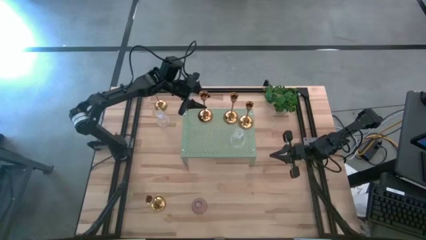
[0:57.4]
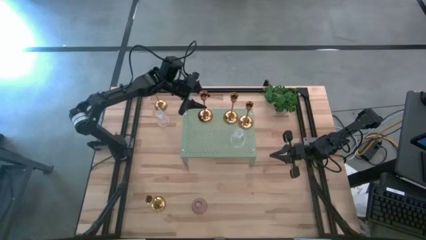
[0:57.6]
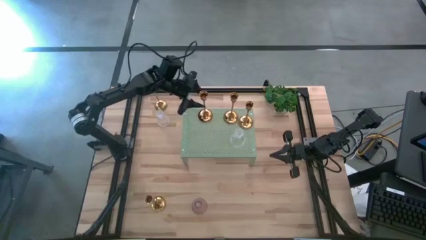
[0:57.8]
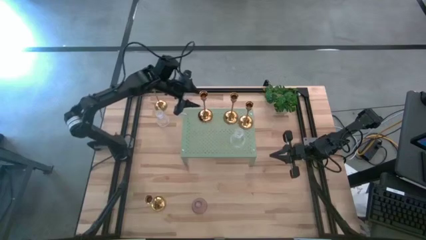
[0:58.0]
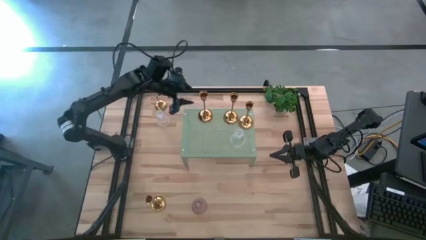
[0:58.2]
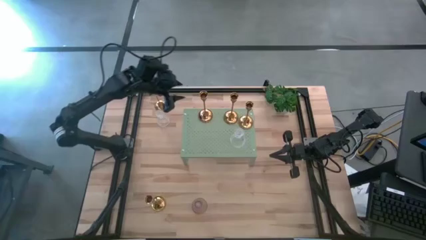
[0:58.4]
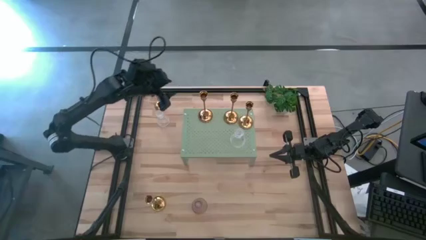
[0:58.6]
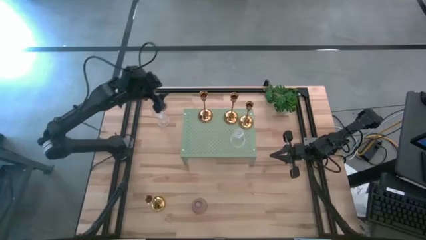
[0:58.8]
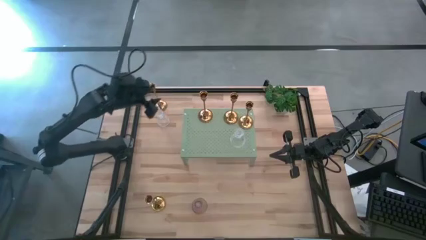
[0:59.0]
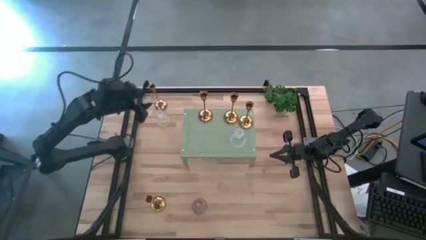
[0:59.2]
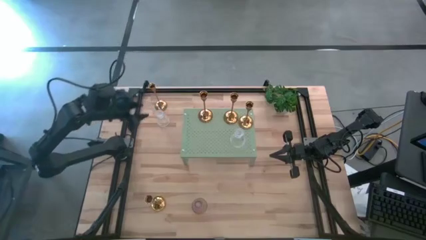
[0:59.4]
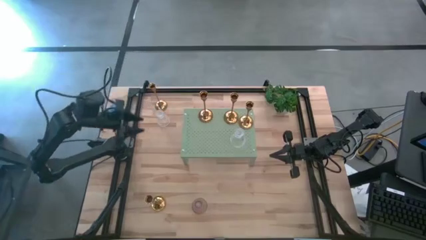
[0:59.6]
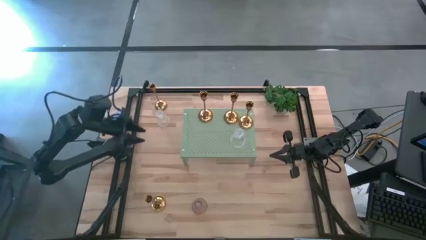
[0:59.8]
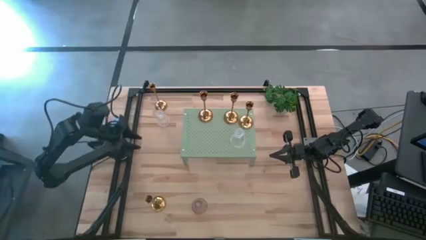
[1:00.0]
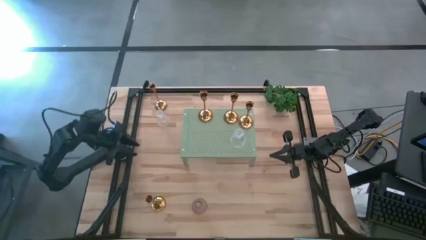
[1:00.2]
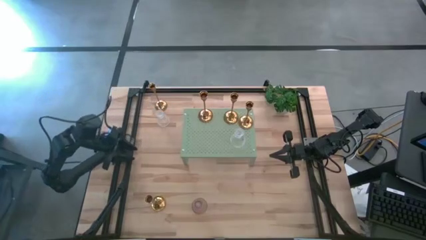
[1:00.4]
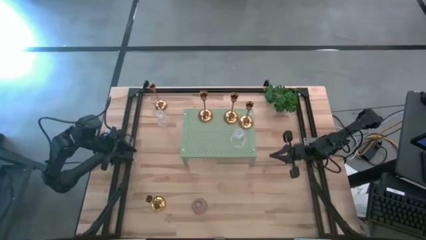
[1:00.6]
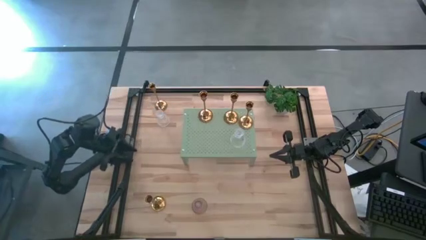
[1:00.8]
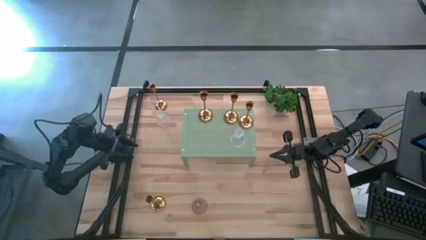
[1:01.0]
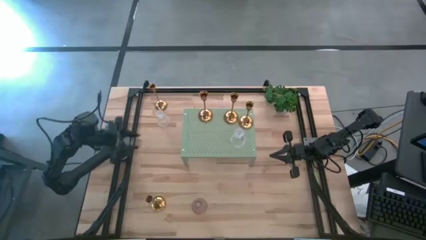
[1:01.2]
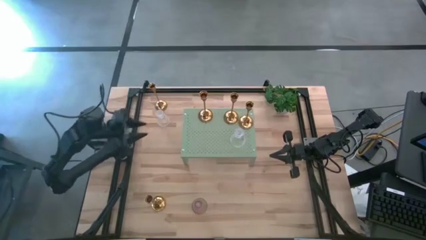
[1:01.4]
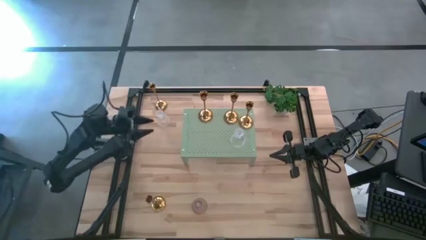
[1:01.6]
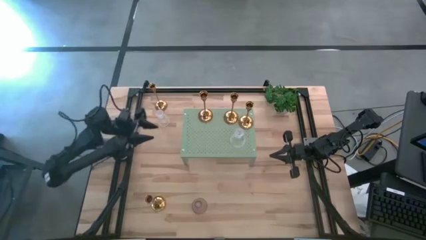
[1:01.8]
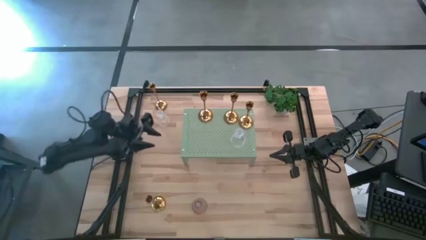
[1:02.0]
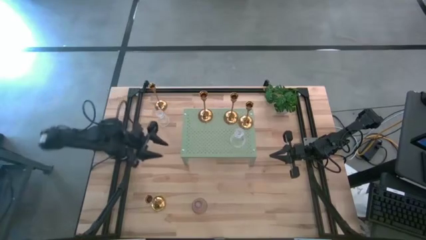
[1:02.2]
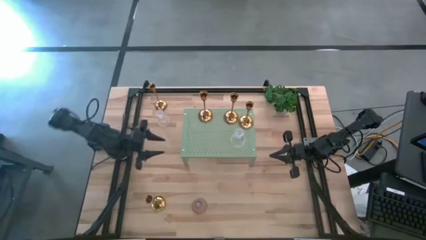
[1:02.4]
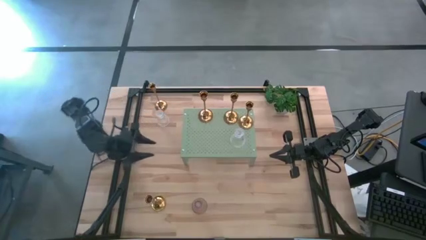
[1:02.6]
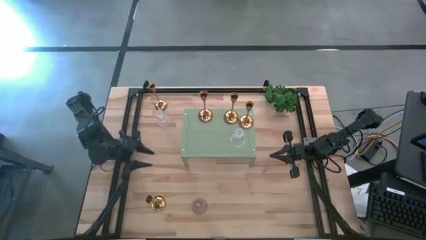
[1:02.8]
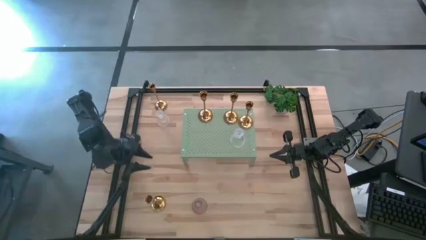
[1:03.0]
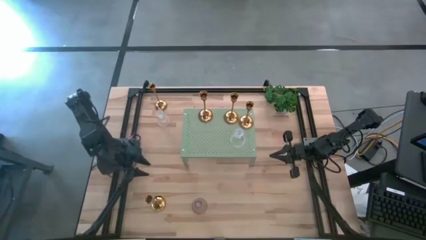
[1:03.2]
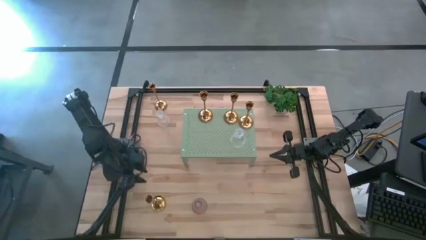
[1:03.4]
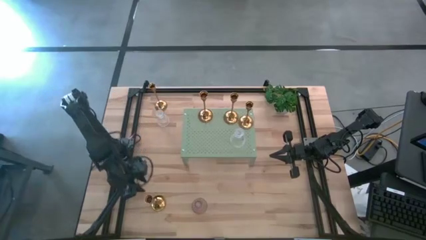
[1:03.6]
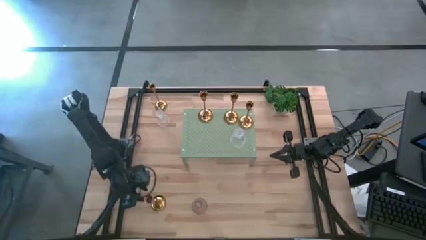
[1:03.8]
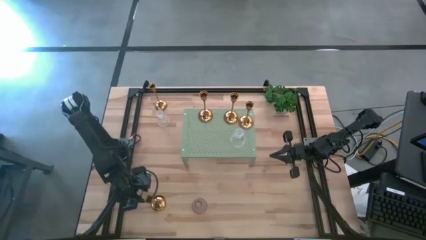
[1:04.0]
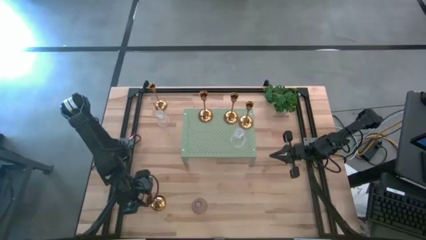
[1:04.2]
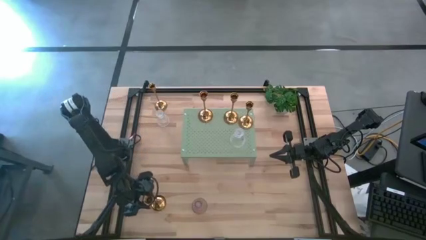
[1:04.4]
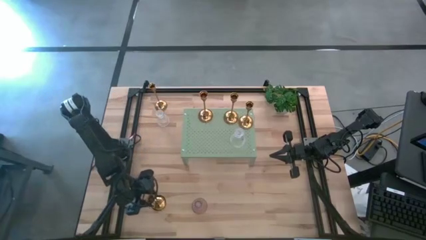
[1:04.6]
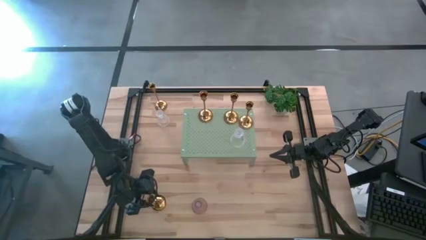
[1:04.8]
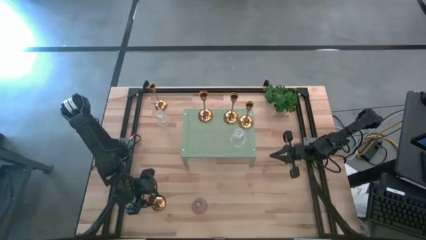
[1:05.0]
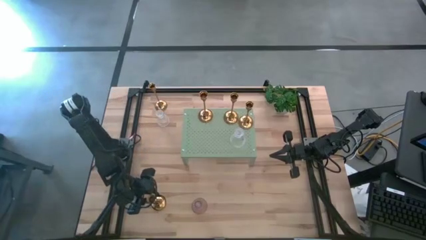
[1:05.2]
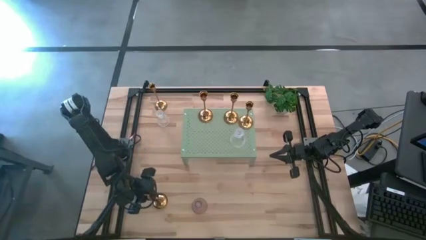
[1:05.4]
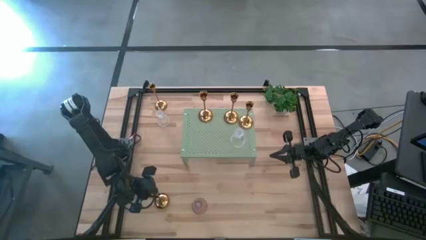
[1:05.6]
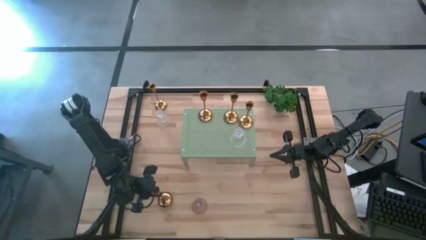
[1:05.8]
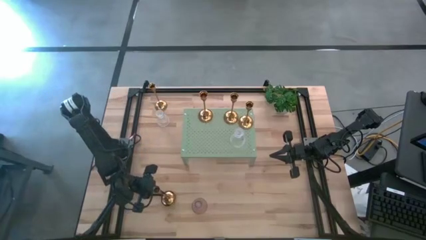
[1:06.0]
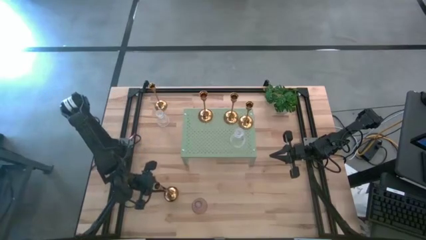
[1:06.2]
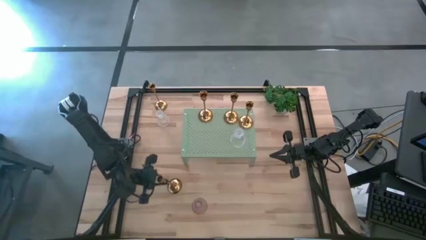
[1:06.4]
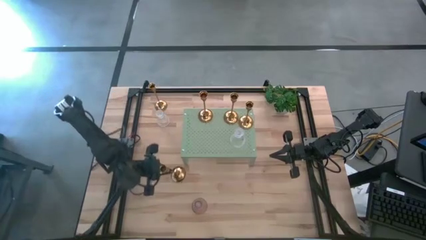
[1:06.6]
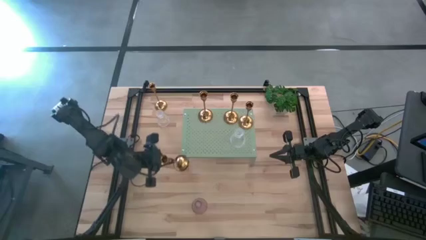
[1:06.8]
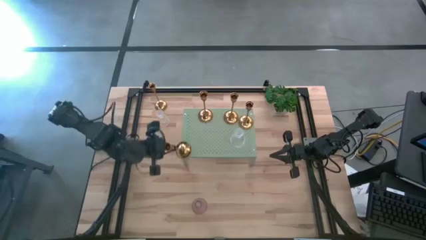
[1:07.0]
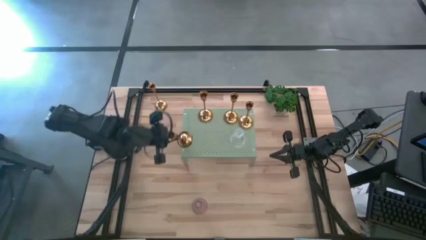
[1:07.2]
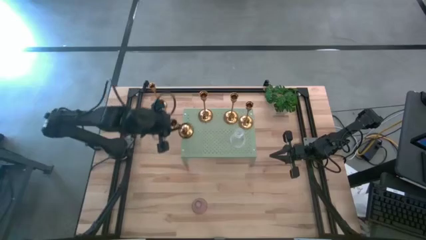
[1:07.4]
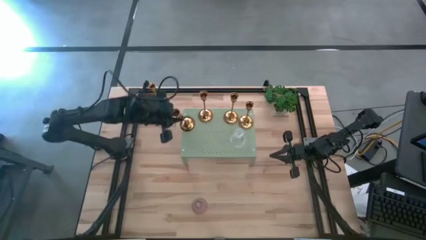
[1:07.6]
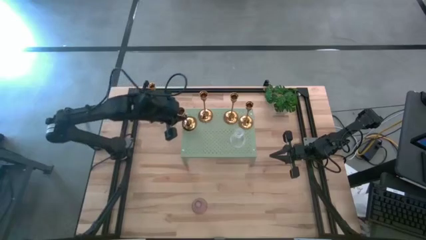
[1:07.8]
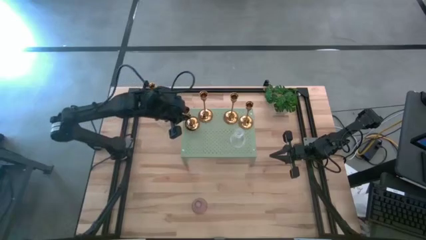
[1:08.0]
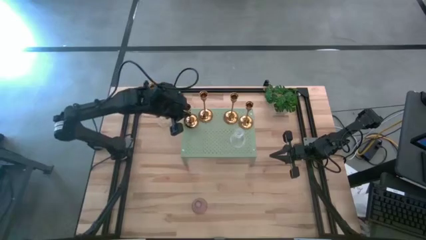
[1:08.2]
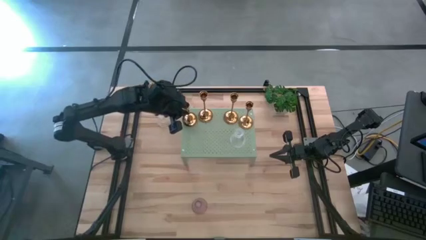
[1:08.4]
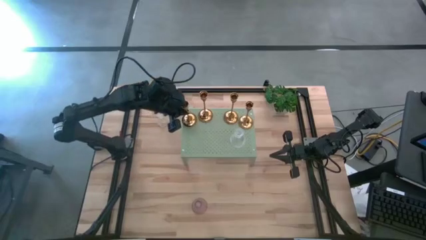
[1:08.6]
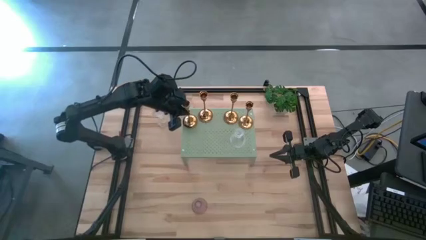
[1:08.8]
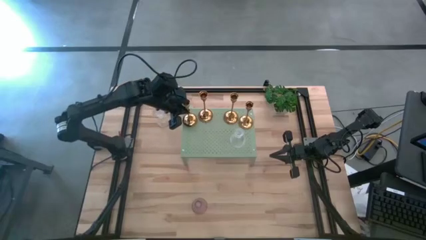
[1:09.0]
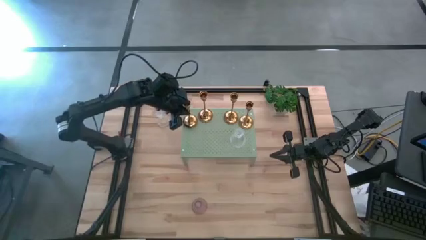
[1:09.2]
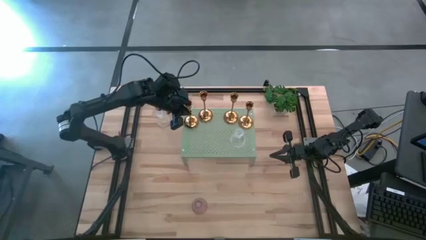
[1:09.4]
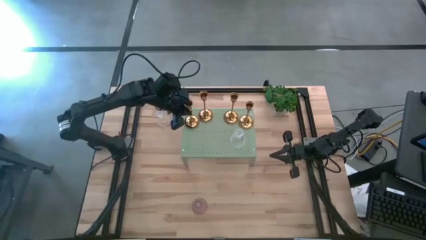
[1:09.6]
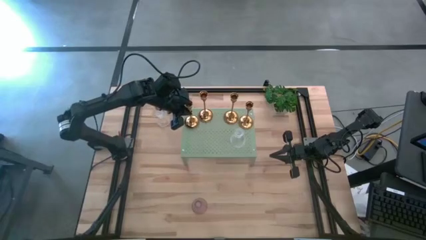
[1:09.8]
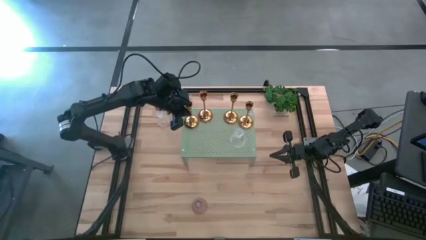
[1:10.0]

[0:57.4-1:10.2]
Task: Pick & Place candle stick holders
Put the gold candle stand on the shelf
